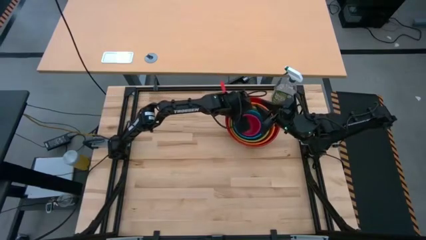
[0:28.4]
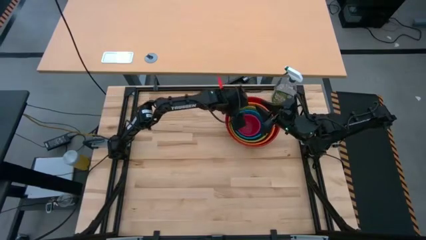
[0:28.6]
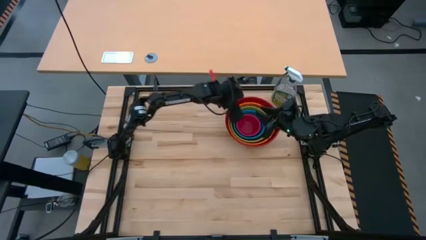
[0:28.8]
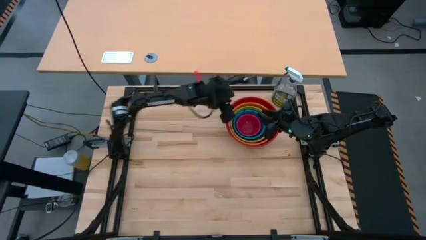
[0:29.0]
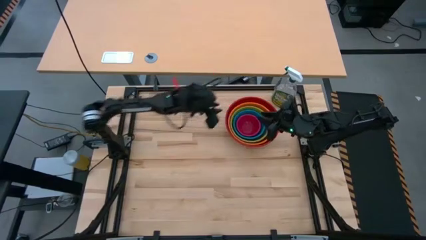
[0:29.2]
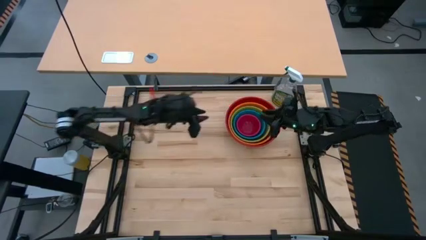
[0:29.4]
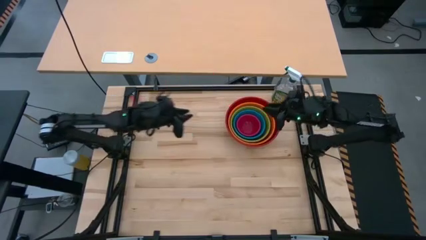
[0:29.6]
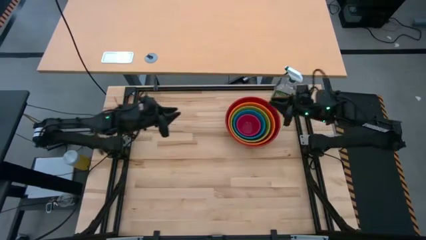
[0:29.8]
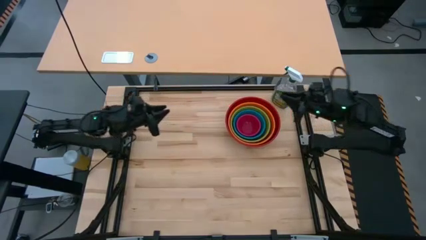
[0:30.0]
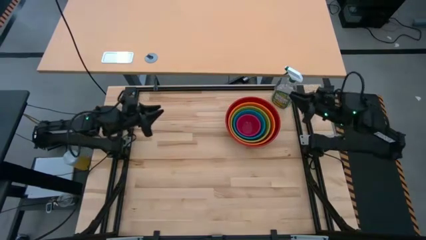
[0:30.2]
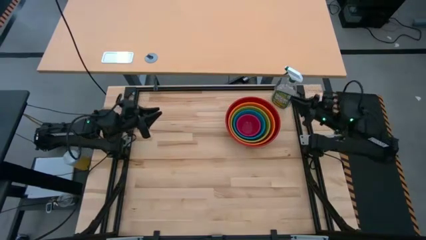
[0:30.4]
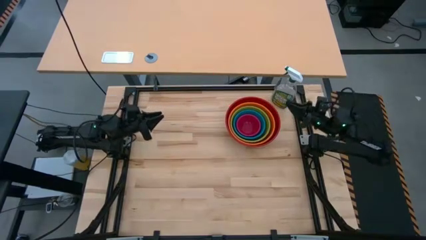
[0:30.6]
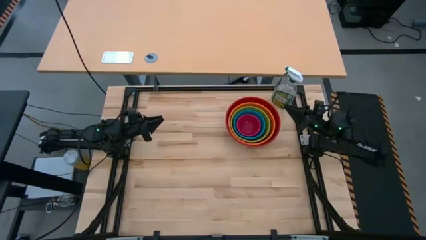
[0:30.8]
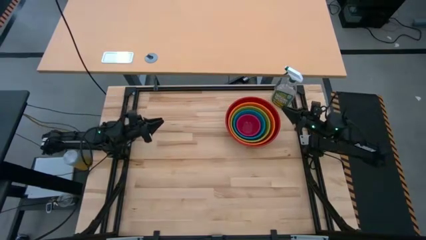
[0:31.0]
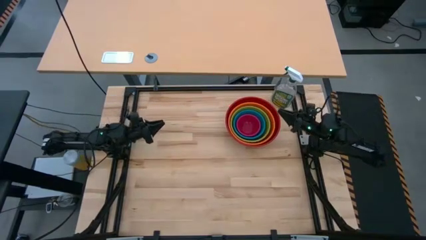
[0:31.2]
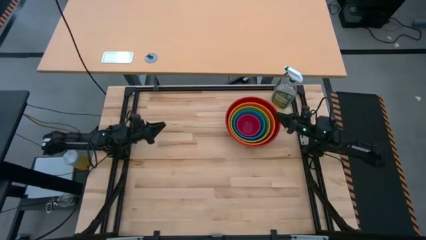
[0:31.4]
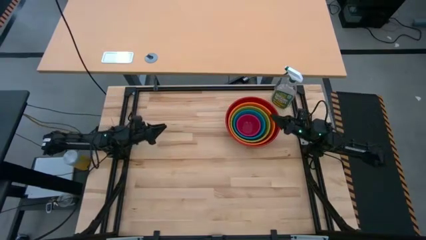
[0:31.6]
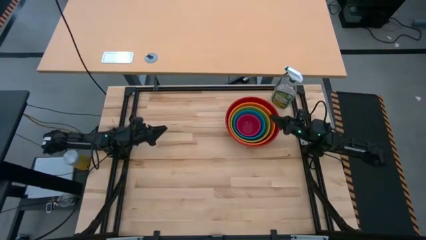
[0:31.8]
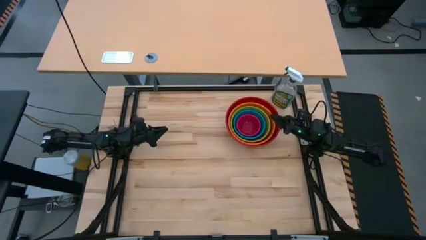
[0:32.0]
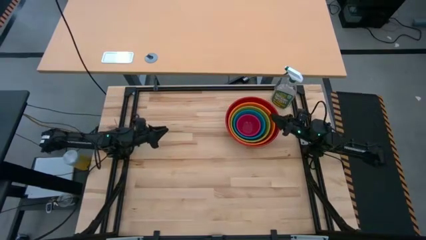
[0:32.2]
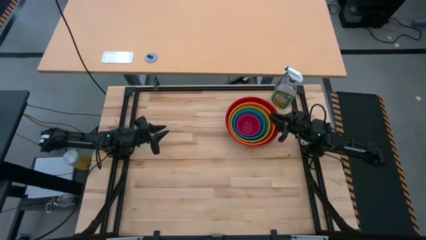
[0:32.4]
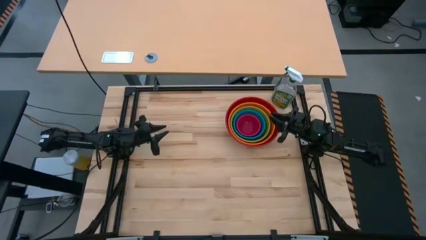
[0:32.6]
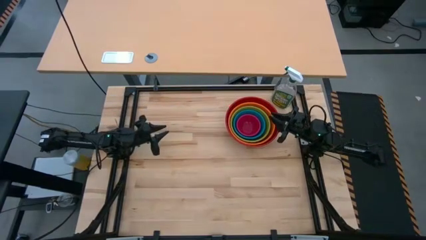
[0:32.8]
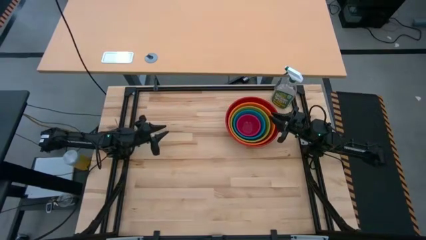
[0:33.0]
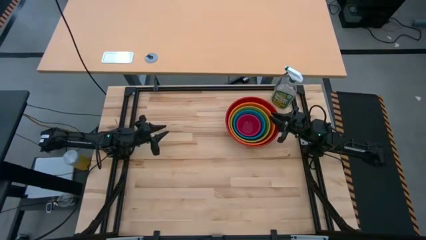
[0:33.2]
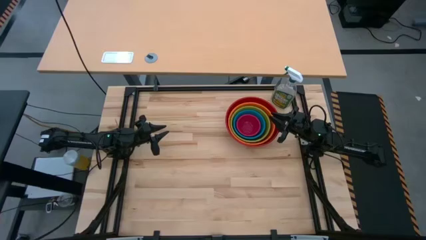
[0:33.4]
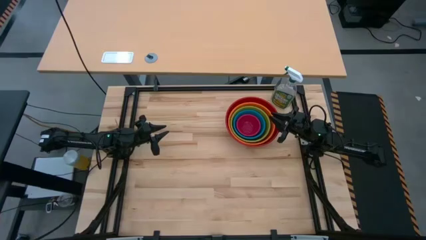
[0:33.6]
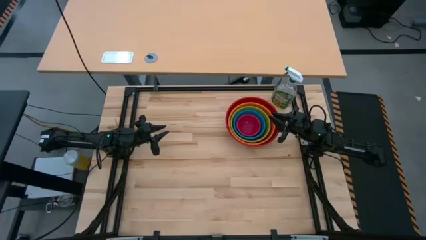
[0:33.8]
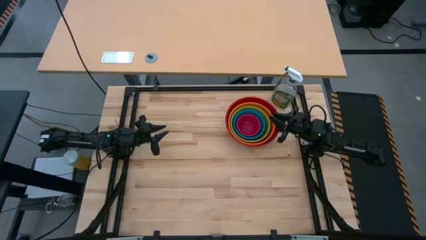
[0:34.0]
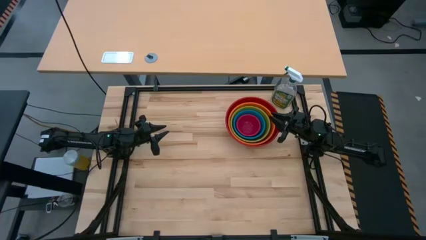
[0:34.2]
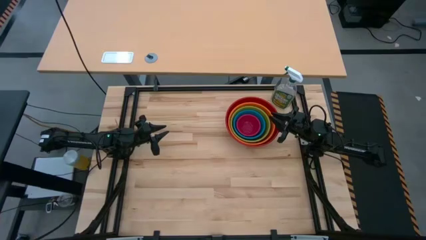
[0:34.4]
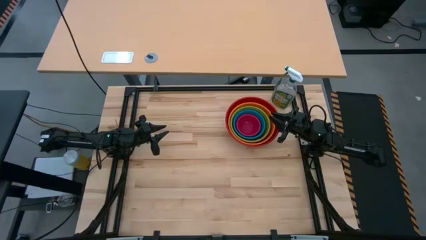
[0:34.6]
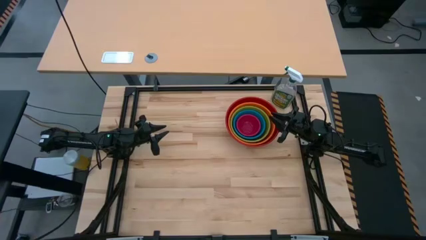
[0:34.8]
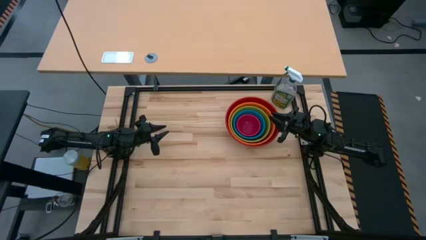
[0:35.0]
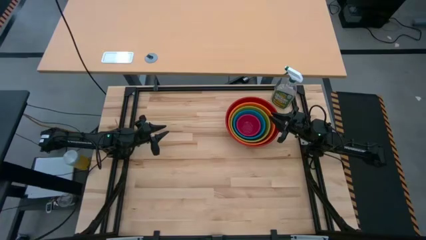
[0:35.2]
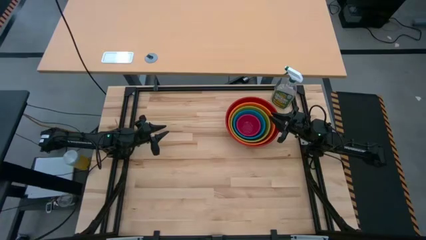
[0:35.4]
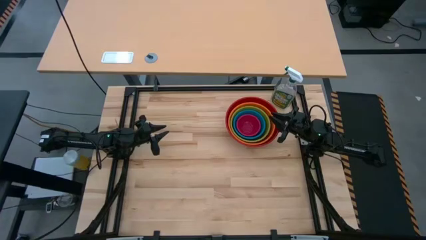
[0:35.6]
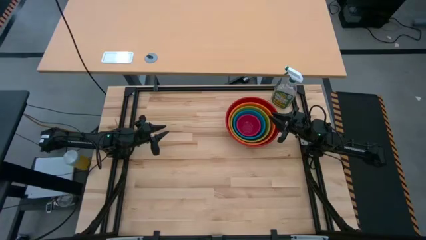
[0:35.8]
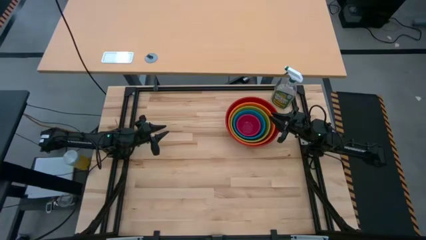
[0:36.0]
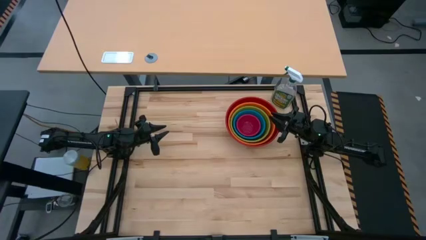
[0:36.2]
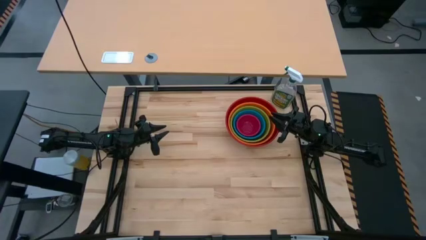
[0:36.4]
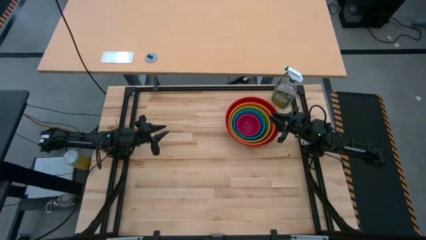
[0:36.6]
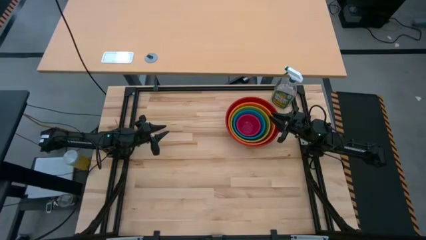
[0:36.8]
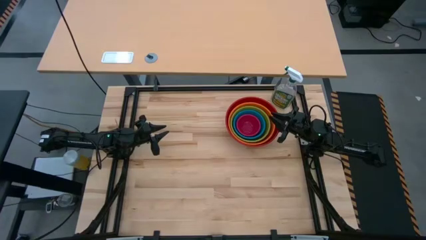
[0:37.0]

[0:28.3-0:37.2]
Return to Home Position

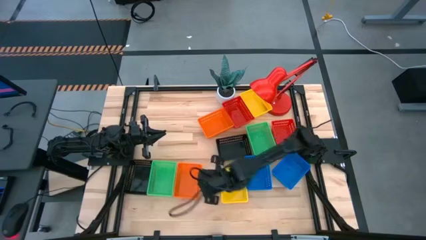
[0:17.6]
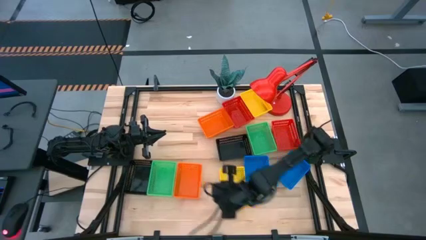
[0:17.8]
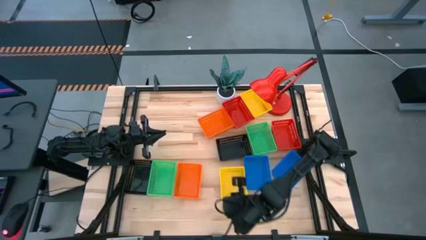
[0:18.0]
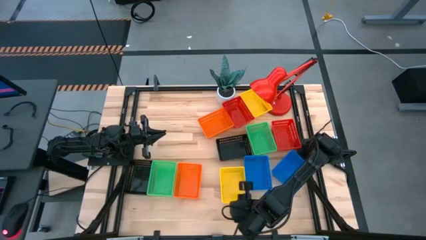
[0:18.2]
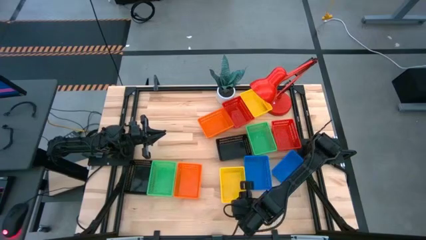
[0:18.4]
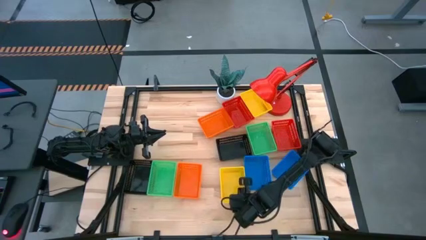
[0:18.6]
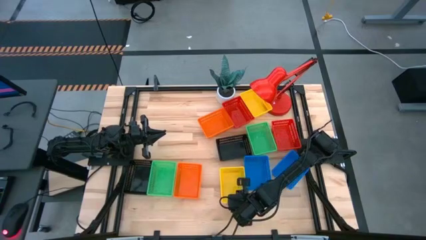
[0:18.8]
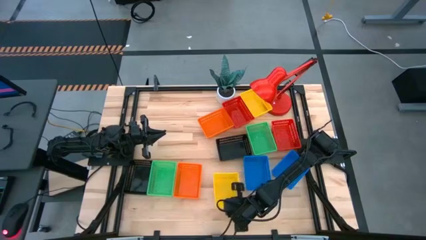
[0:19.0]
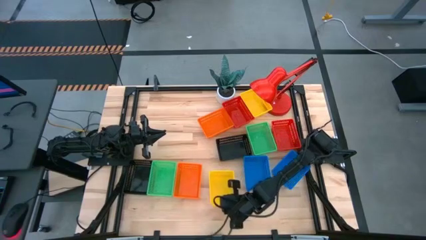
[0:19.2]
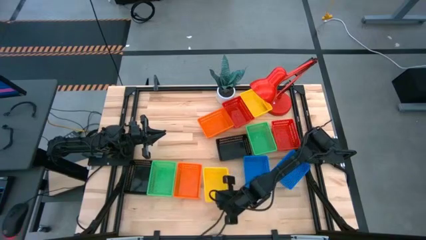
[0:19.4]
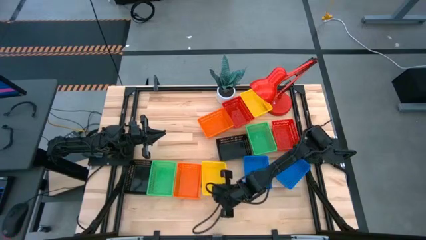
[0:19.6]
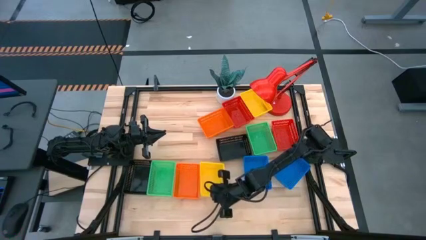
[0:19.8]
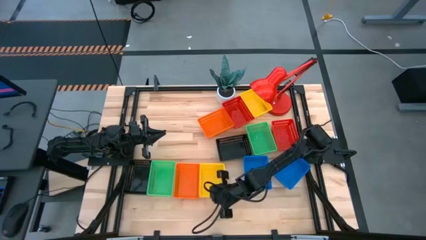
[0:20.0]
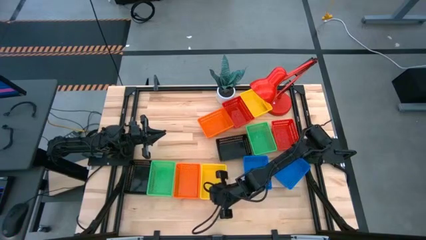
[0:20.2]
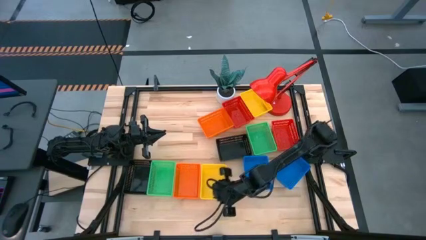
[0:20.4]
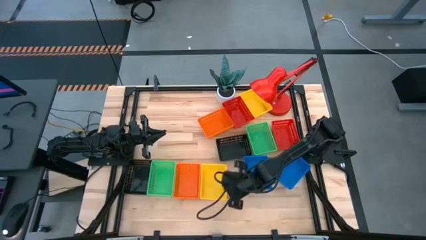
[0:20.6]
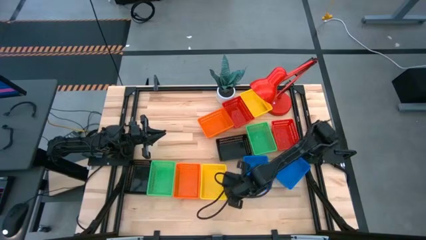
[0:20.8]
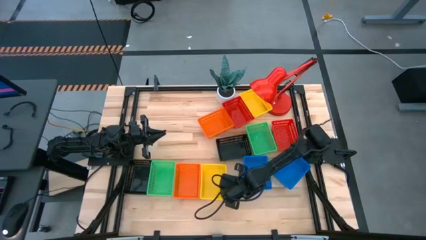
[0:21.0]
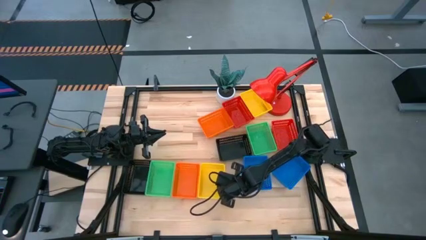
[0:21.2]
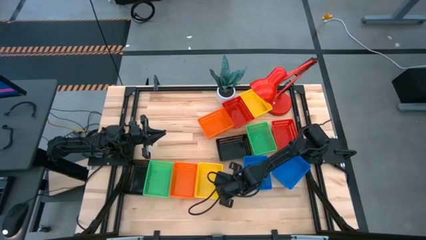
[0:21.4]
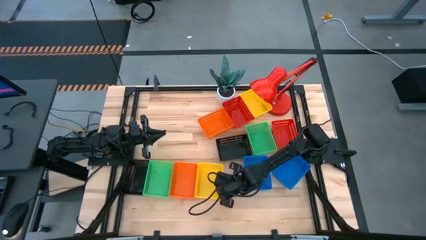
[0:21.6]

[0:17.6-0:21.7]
Move the bottom yellow bin to the bottom center of the table

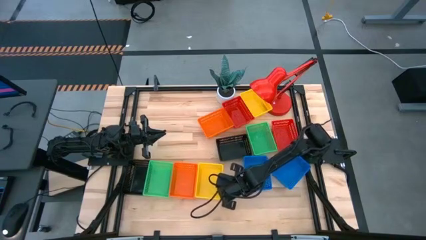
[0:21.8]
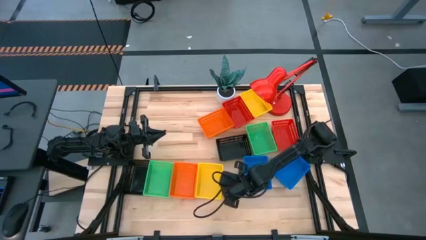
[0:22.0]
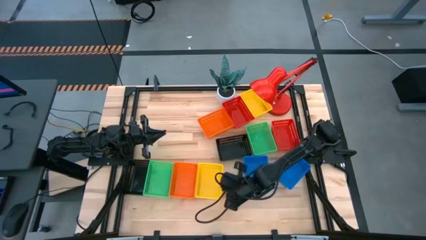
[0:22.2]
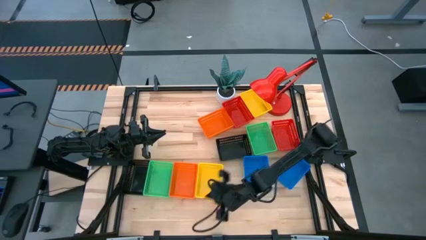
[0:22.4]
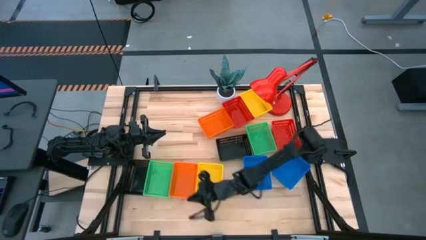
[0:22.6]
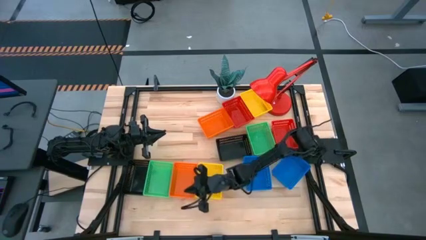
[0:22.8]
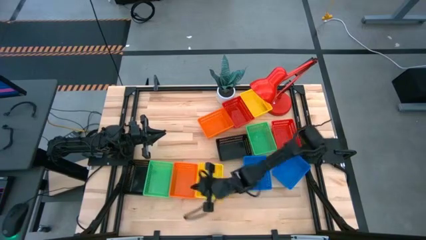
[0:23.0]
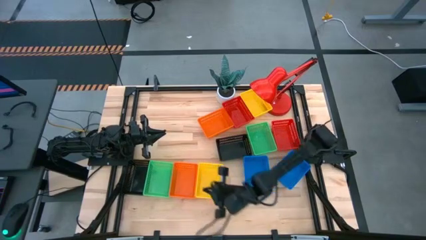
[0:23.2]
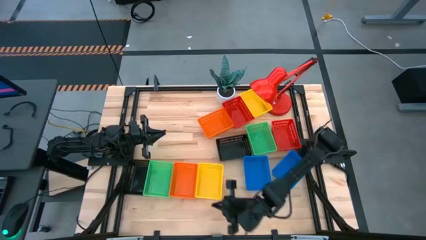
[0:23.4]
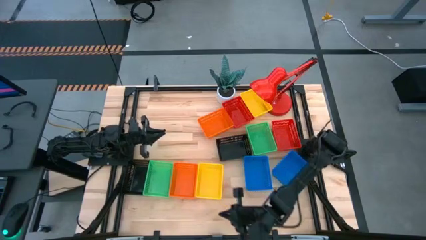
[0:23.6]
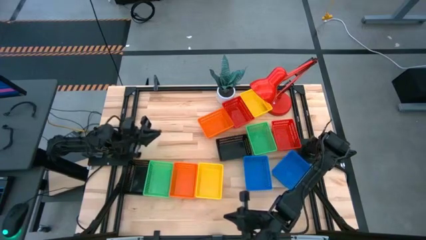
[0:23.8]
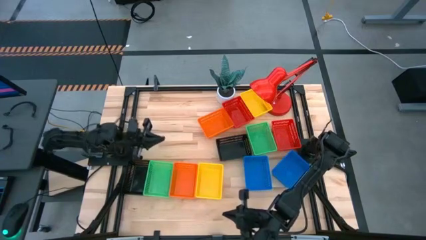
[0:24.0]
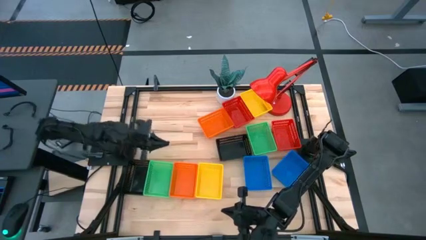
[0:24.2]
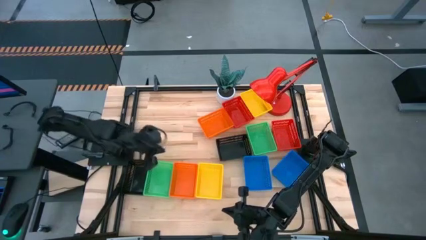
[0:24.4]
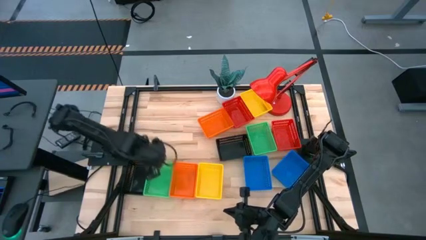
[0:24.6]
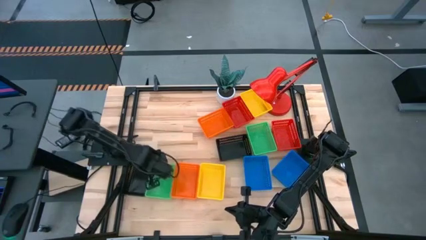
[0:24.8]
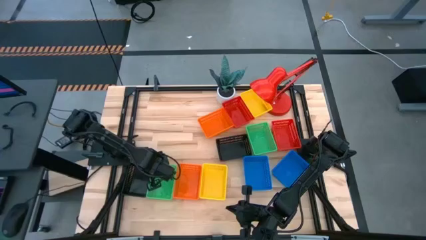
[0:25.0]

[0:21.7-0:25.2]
Adjust the left black bin

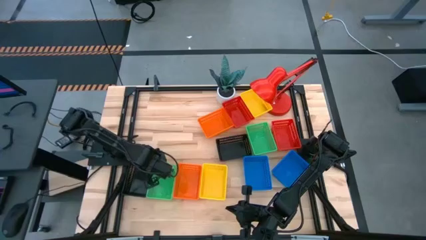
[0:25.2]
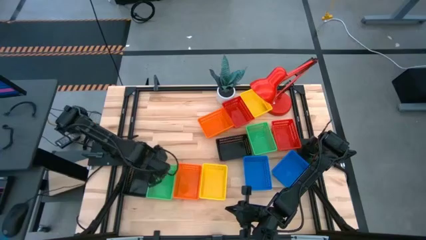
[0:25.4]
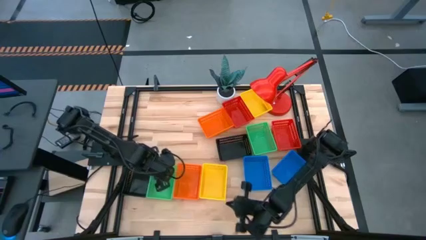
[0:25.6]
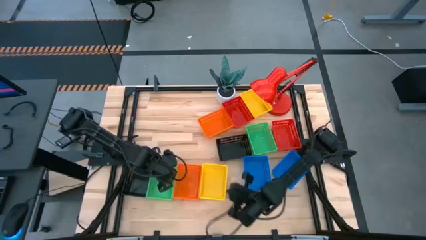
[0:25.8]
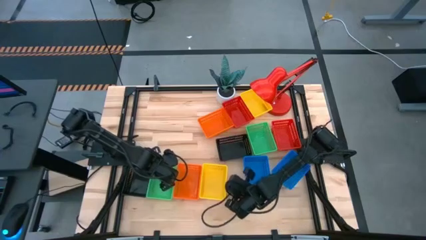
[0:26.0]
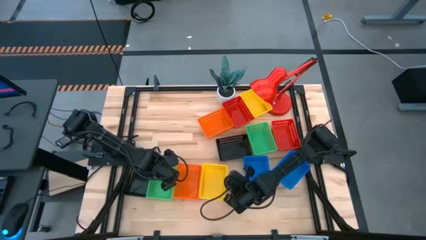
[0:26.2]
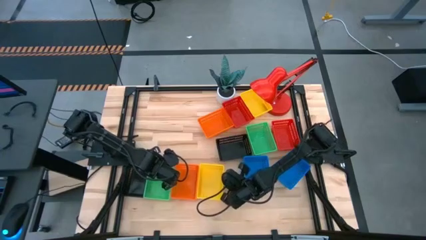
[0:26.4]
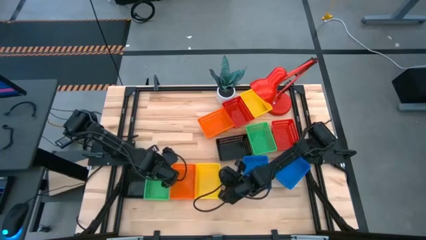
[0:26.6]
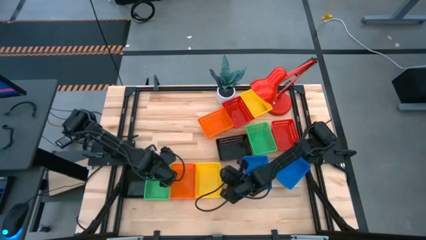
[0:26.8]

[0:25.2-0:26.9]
Adjust the bottom yellow bin
